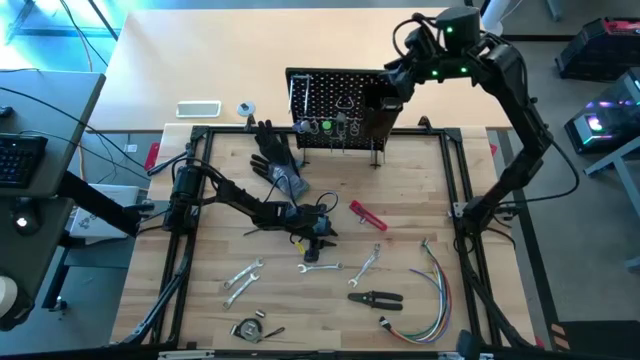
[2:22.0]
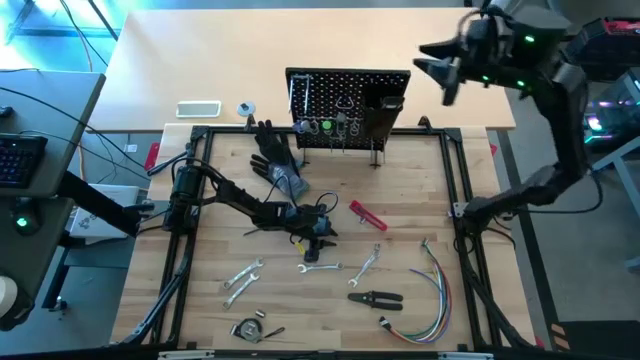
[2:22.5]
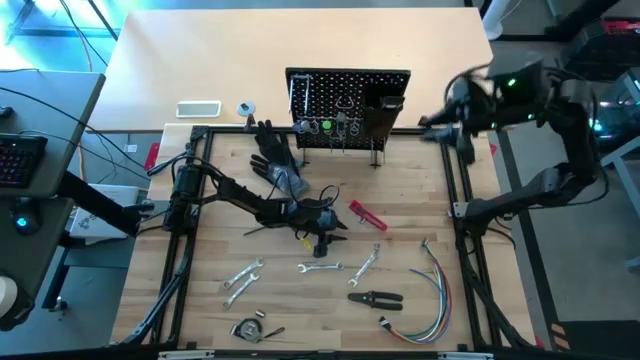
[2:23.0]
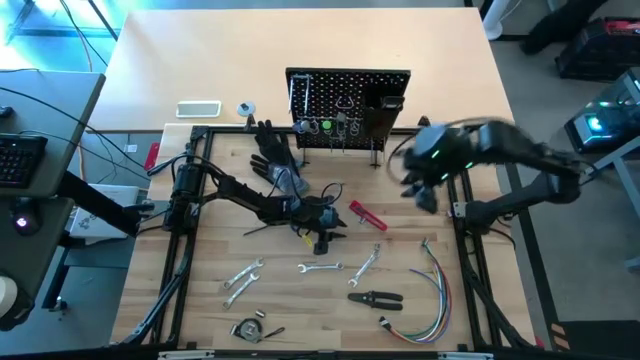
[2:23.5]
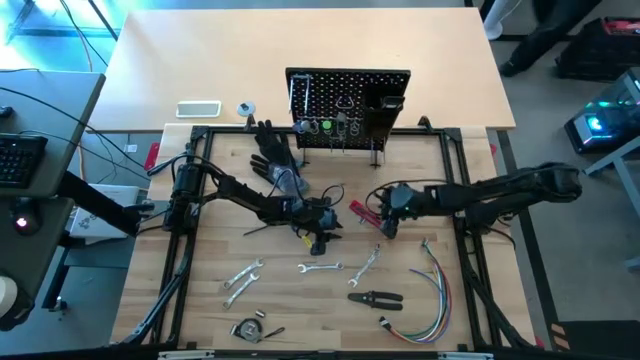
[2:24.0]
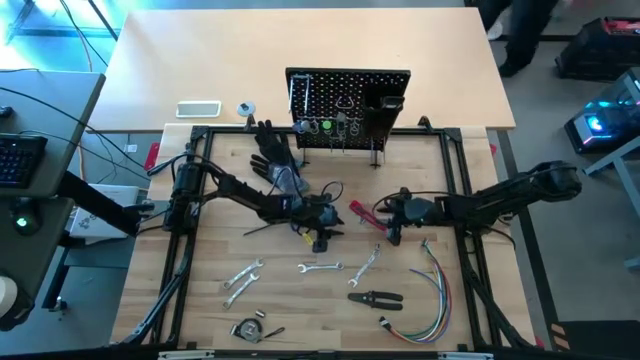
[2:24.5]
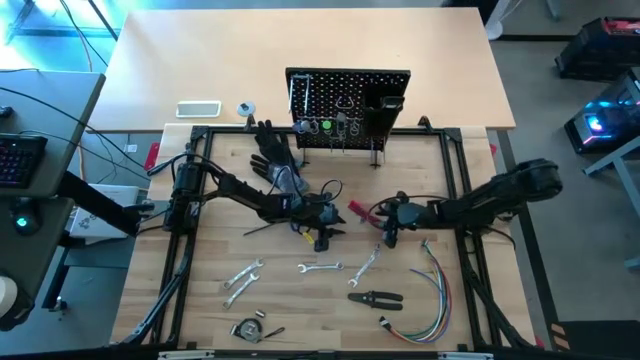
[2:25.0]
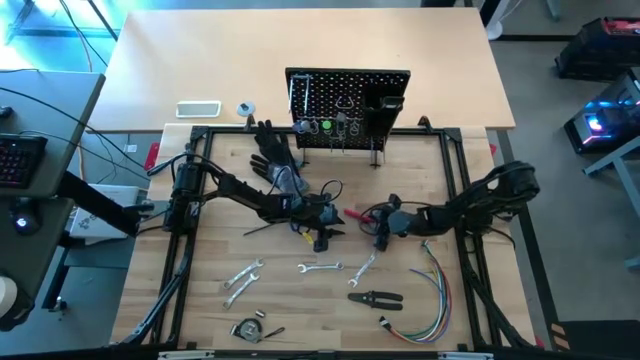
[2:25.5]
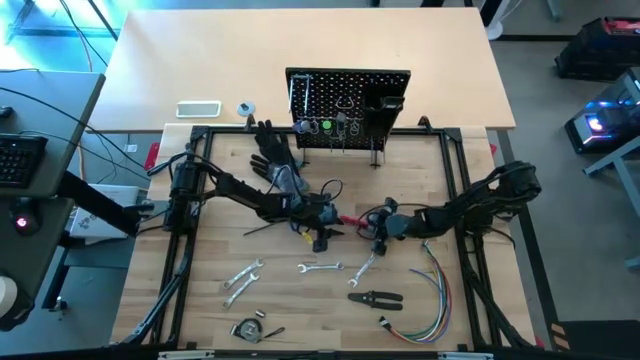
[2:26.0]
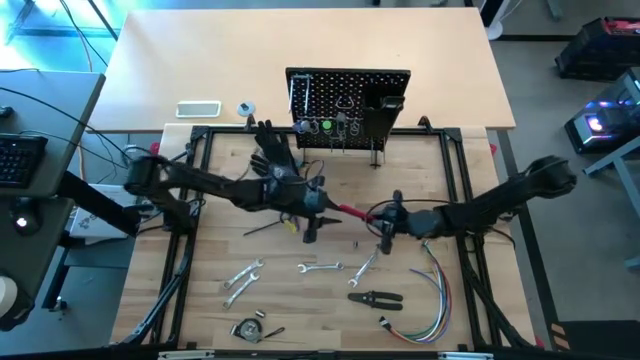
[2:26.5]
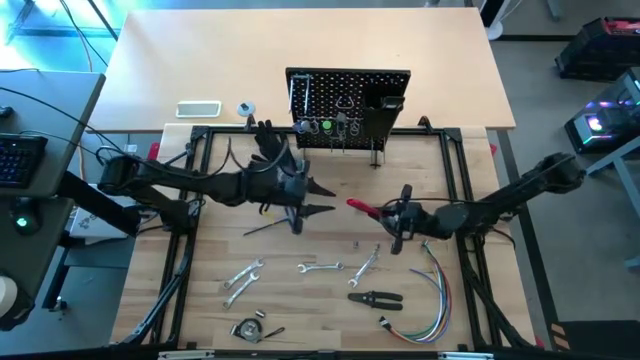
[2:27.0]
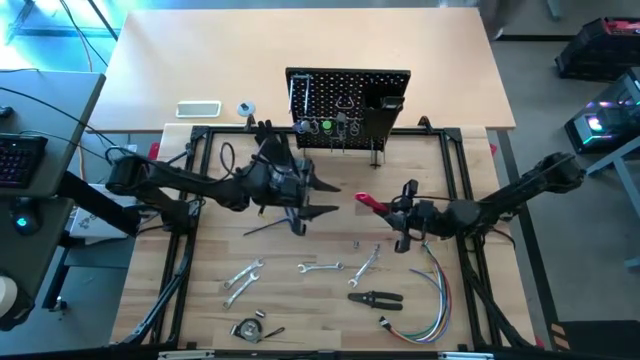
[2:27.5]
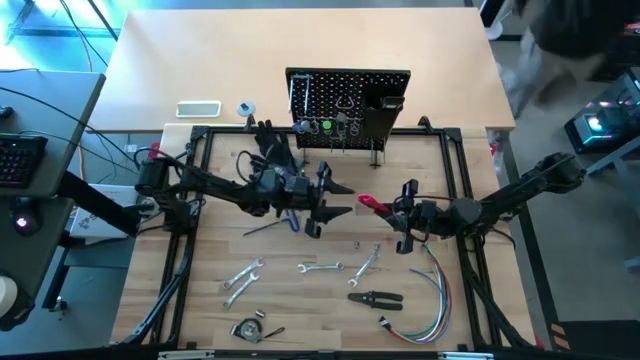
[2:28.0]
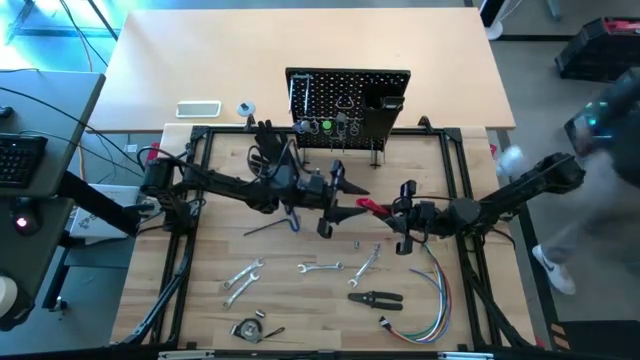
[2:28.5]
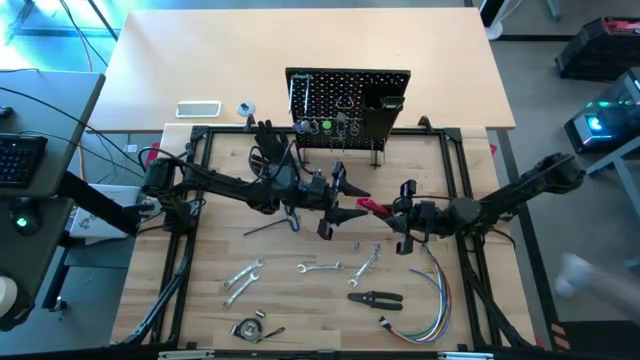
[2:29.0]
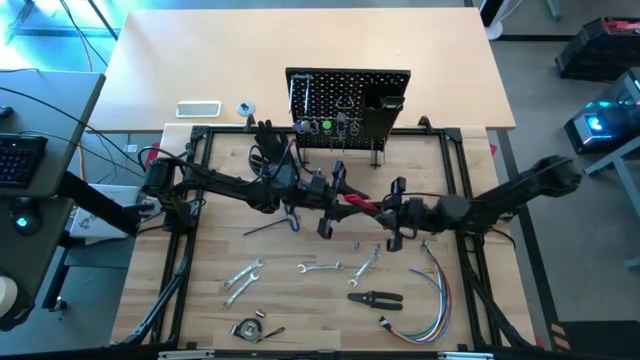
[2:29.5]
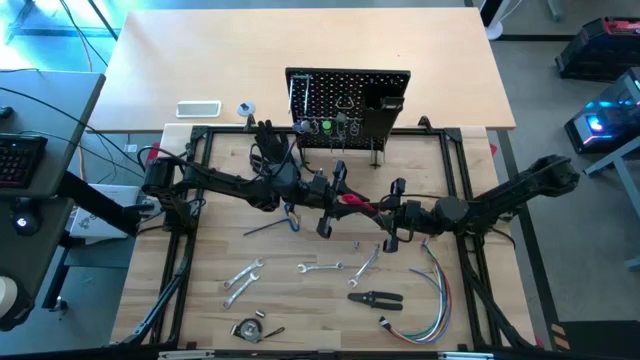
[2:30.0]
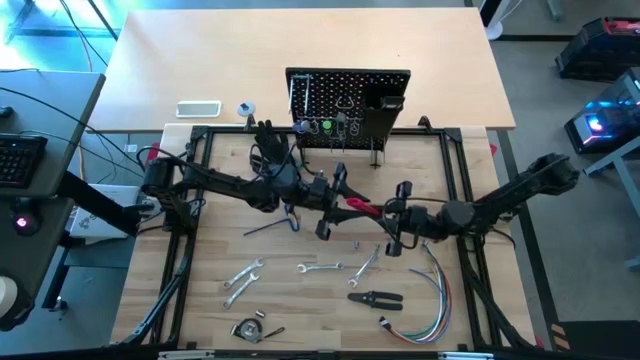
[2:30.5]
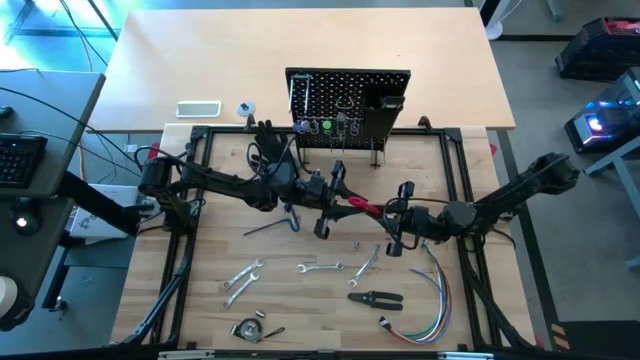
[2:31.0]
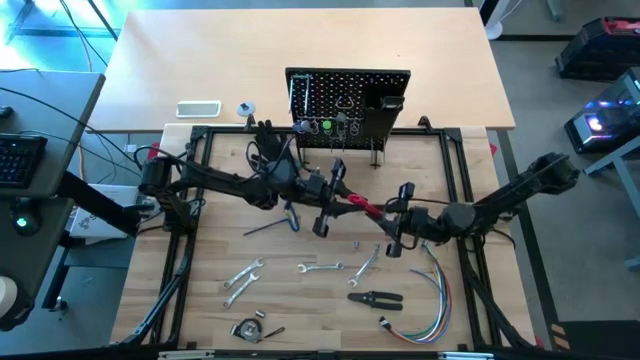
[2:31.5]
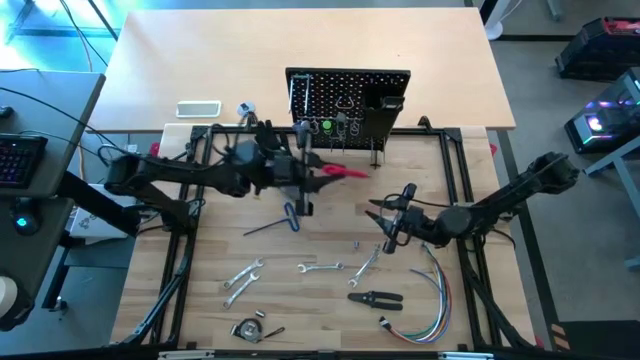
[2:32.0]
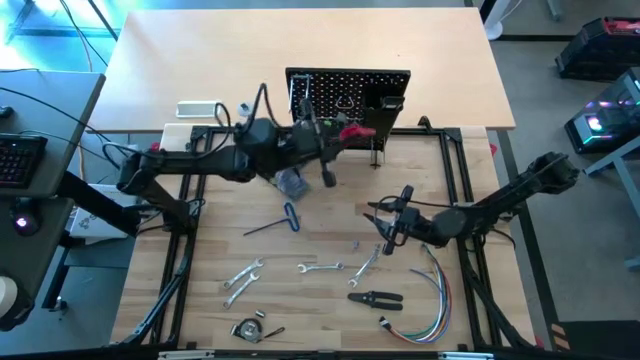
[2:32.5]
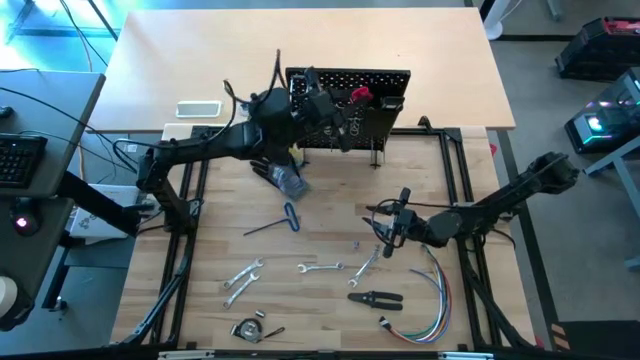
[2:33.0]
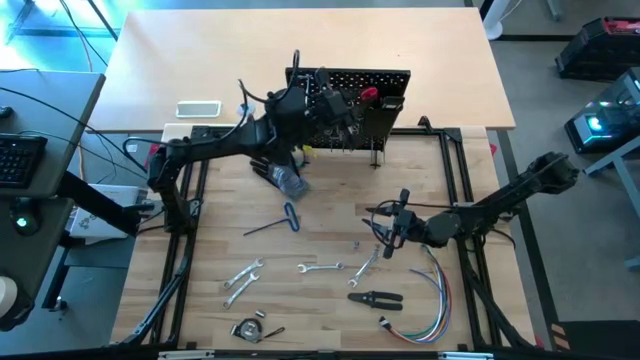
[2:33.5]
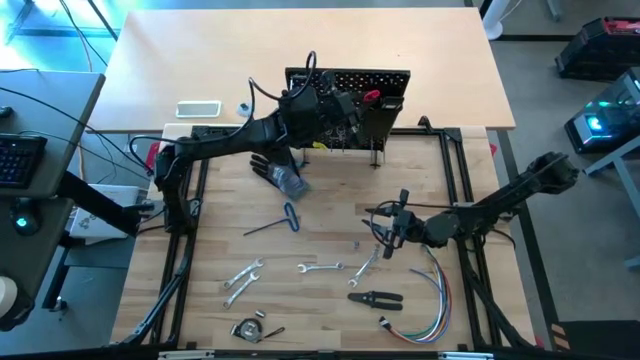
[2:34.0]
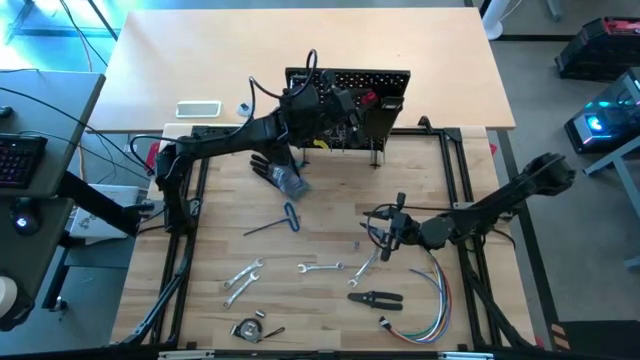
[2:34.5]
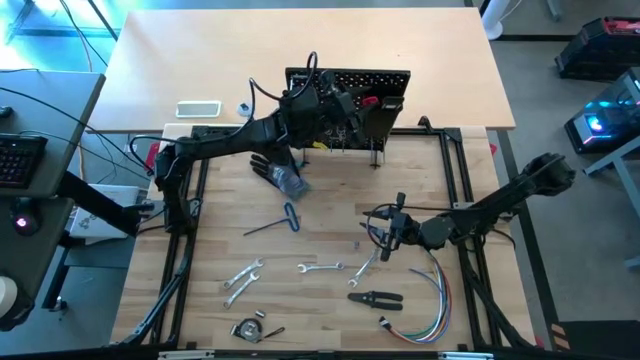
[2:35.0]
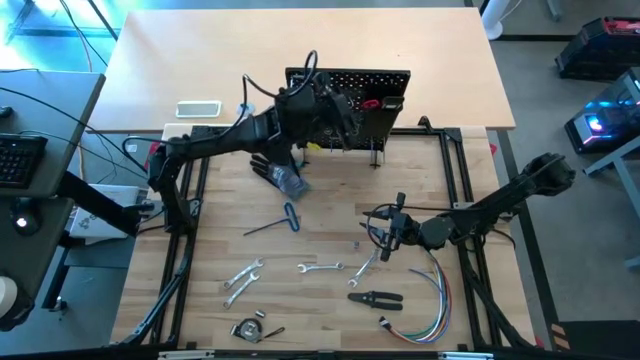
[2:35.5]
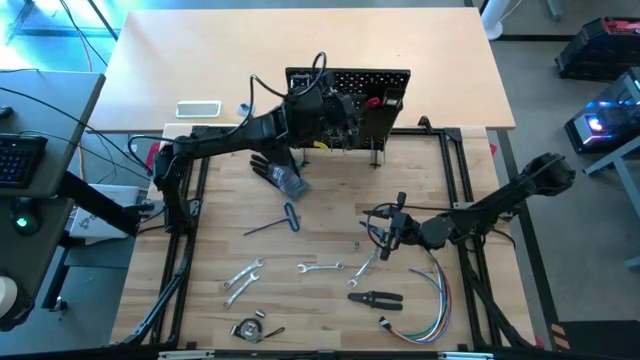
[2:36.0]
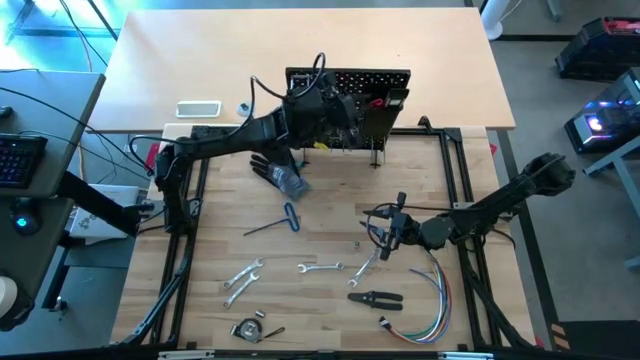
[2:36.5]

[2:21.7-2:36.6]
Task: Hang tools onto peg board
Put the red cutter into the black bin on the pegboard

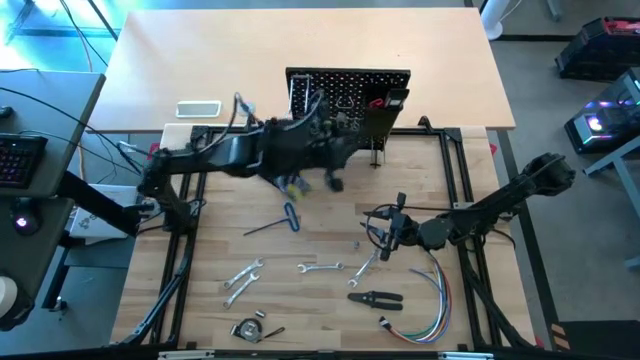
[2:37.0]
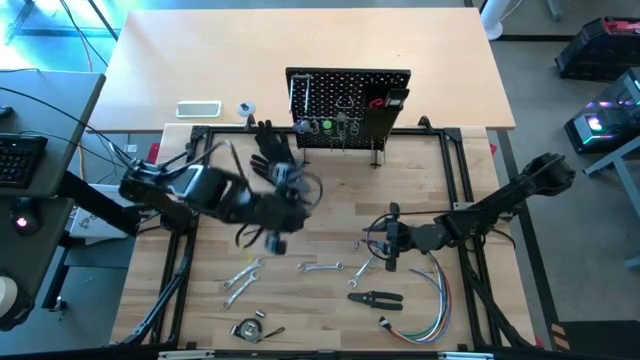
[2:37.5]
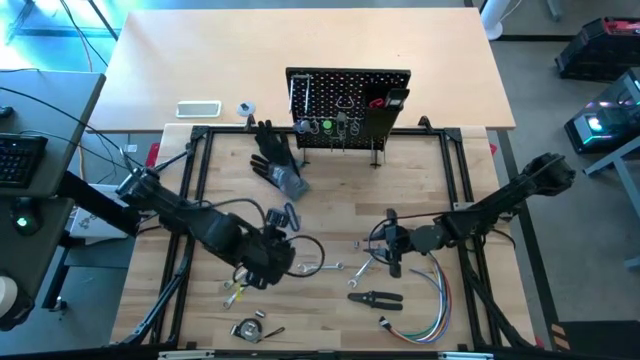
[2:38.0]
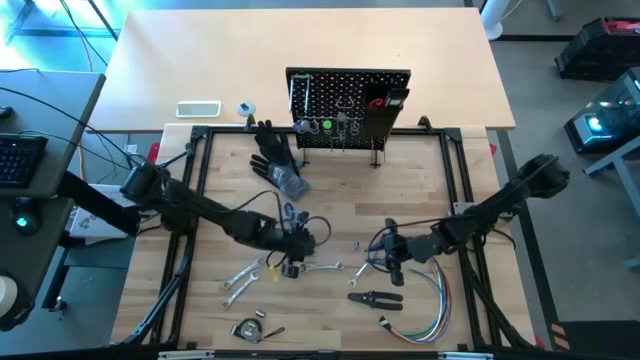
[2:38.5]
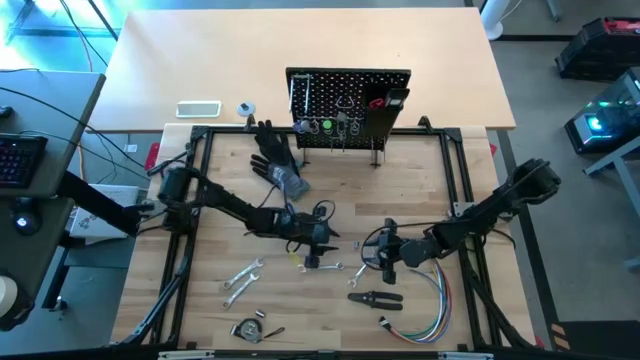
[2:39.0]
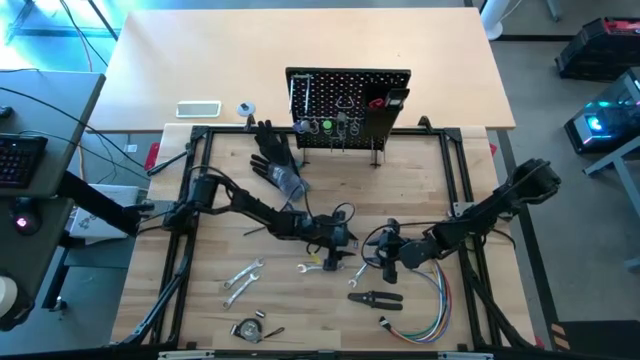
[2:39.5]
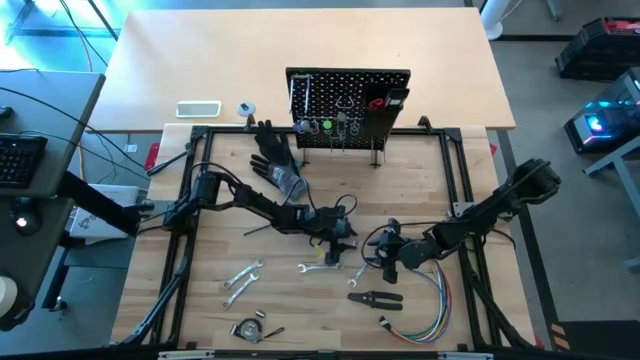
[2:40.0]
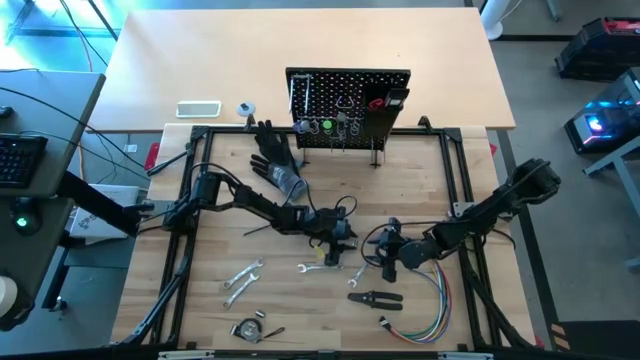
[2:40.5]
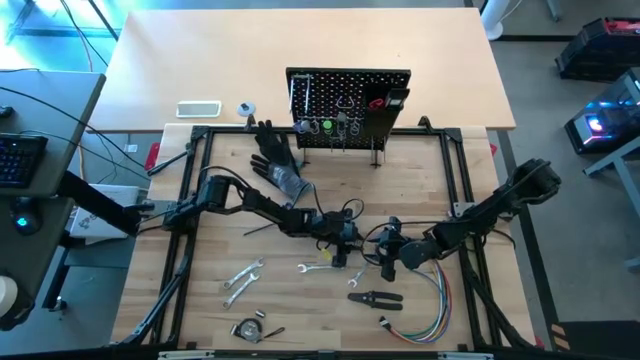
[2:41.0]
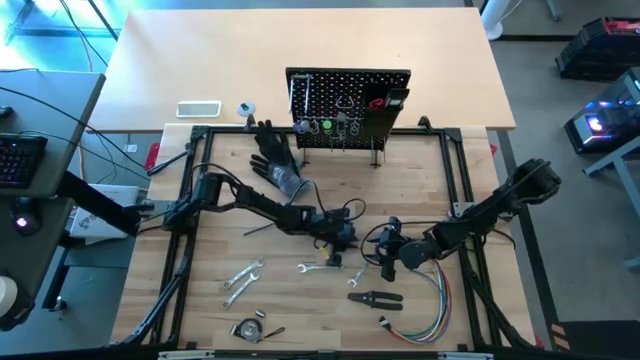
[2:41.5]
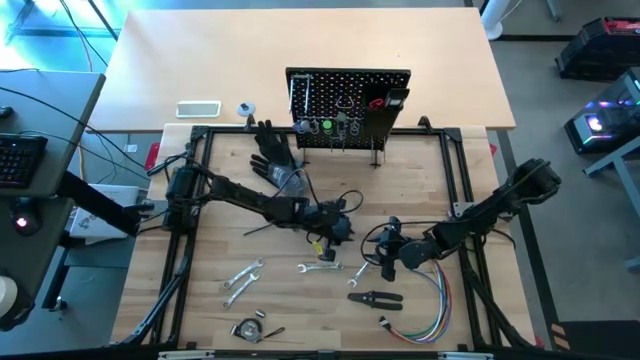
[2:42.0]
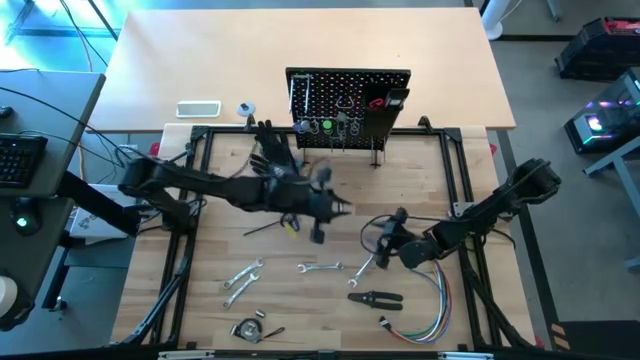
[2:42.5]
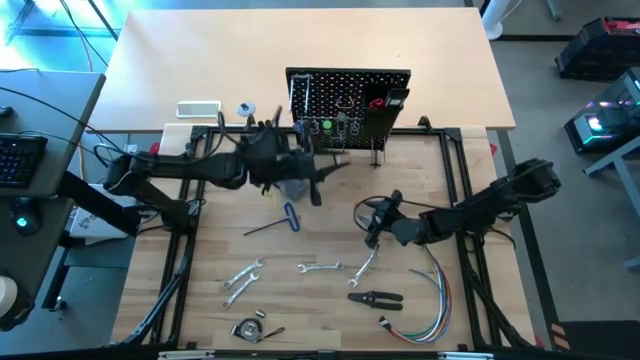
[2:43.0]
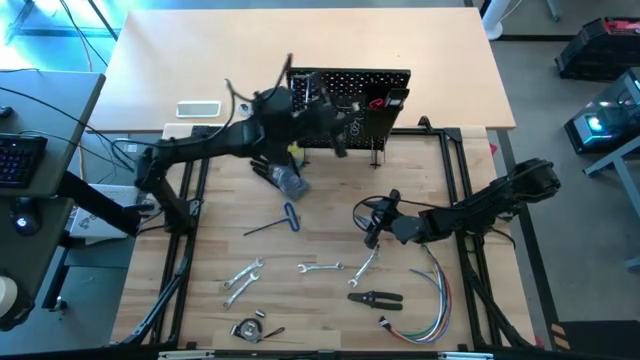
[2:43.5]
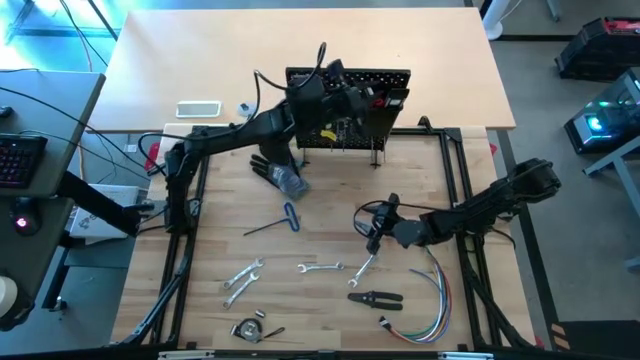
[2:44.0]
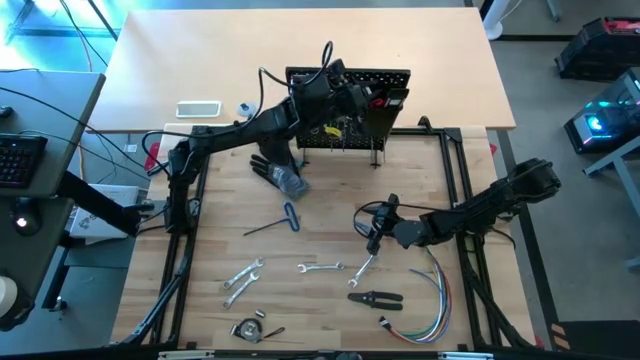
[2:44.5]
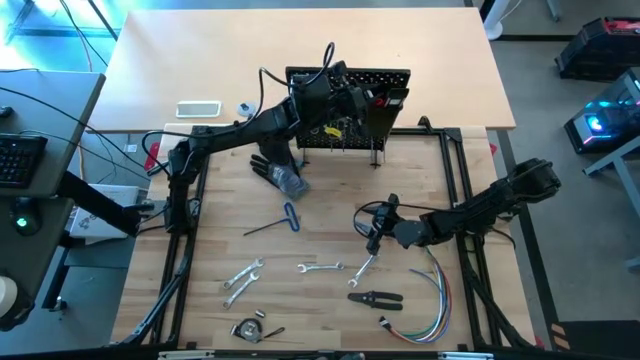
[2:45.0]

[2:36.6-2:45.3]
Put the silver socket into the black bin on the pegboard
